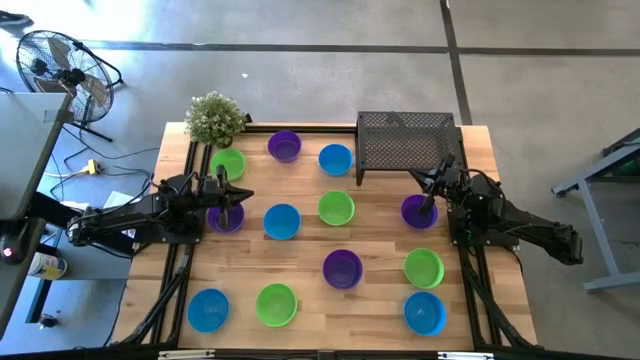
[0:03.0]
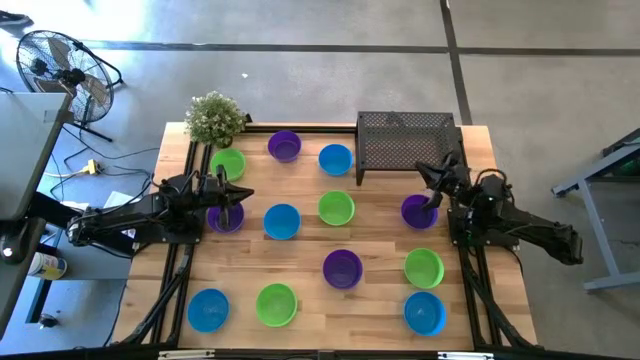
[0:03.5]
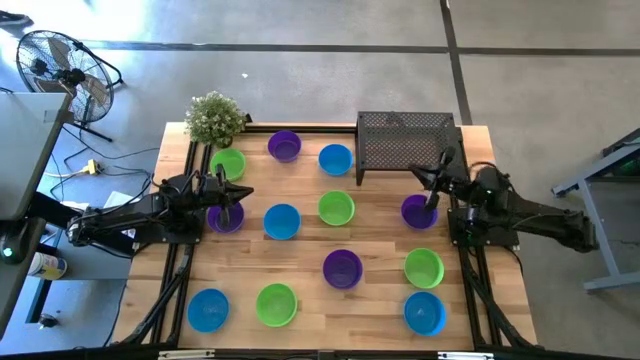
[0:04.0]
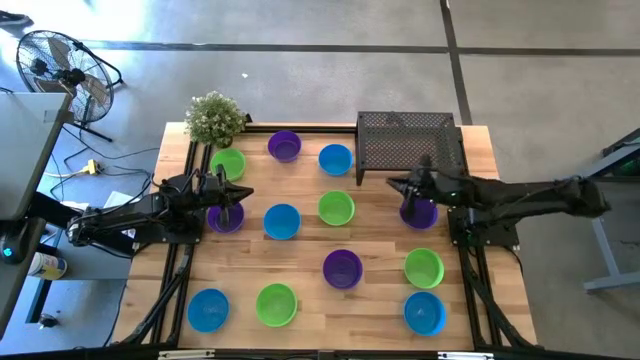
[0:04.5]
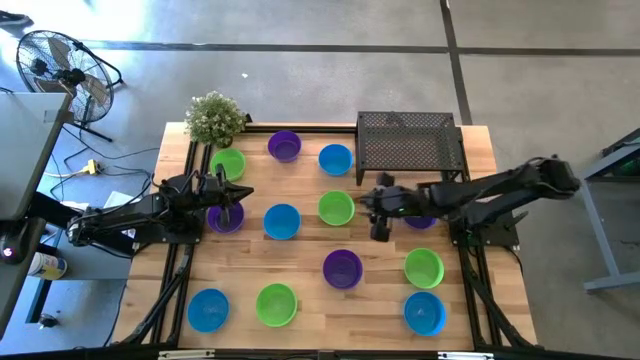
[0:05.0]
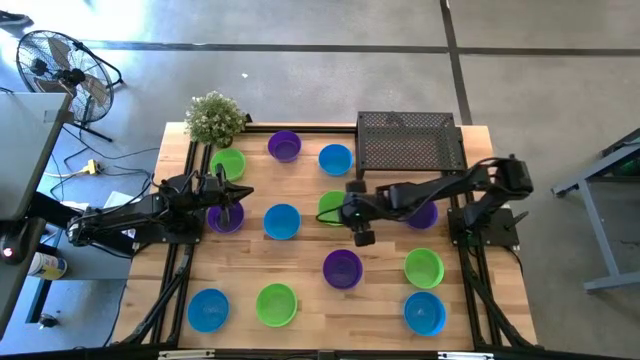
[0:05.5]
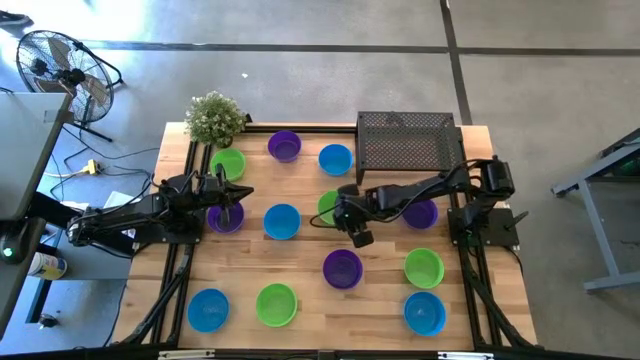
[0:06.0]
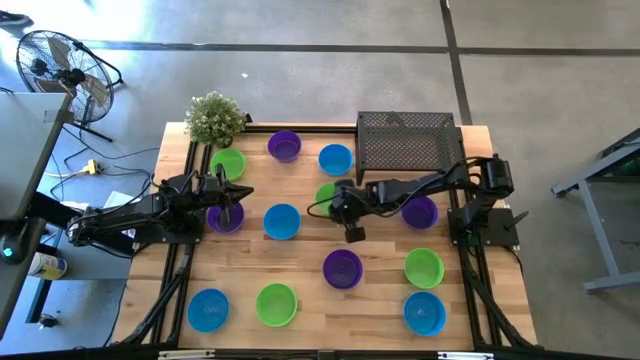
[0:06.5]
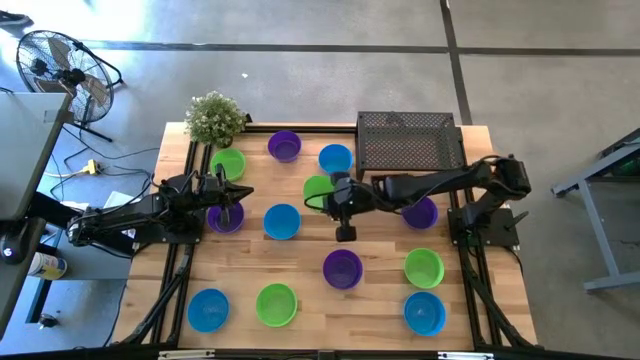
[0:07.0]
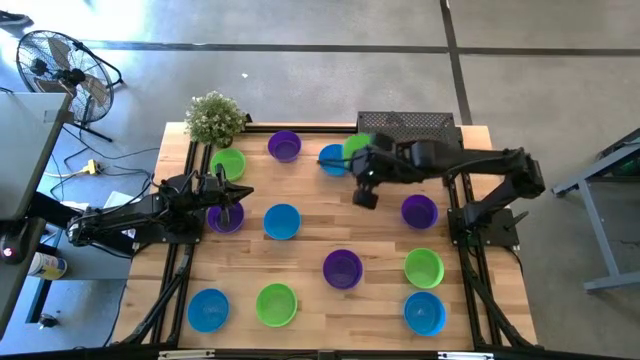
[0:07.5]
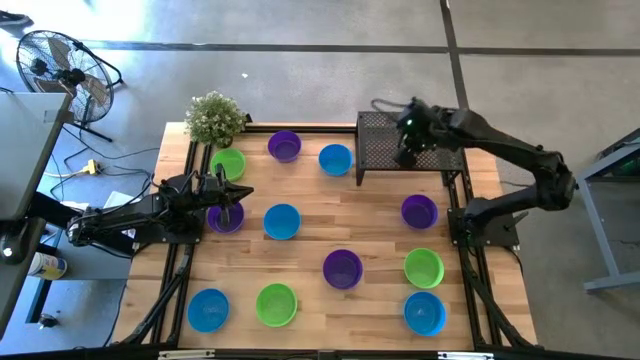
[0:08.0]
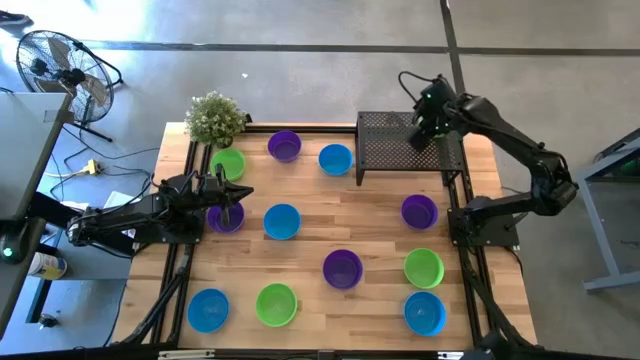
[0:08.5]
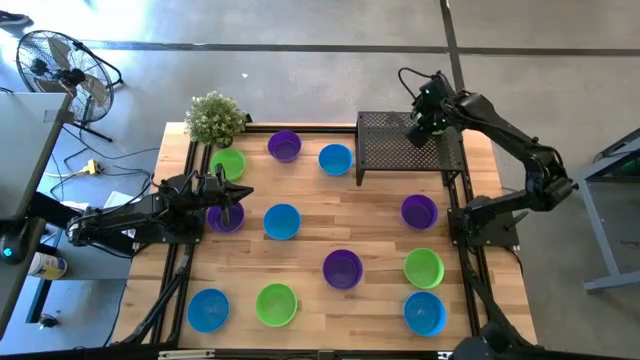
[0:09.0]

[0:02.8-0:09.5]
Task: Pick & Place Mini bowls
Put the green bowl on the shelf

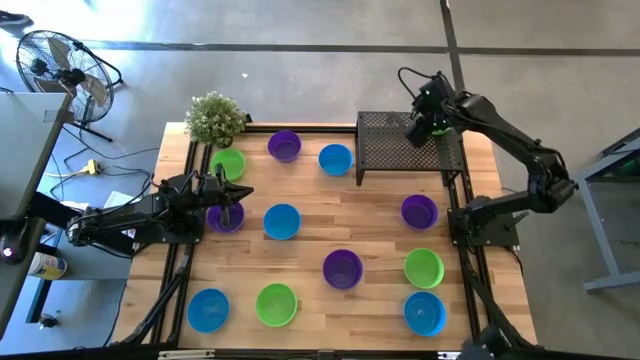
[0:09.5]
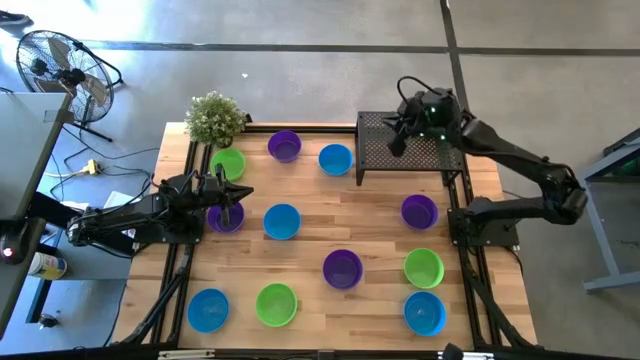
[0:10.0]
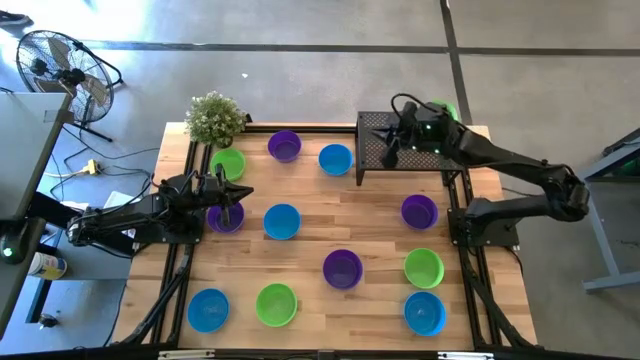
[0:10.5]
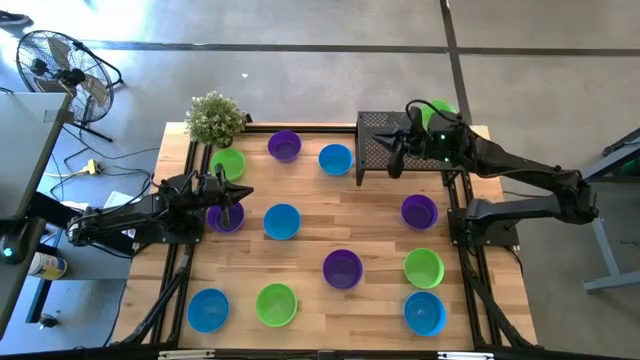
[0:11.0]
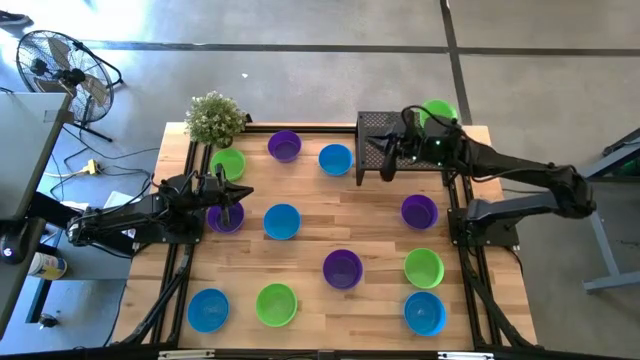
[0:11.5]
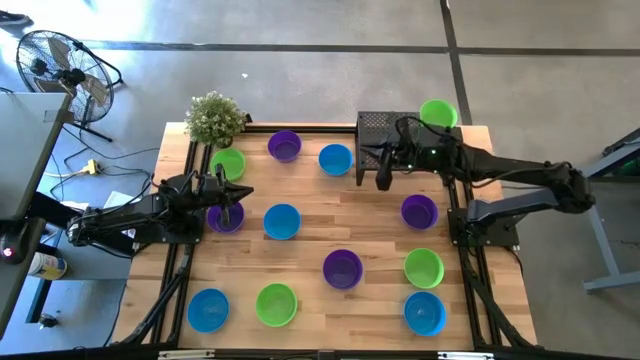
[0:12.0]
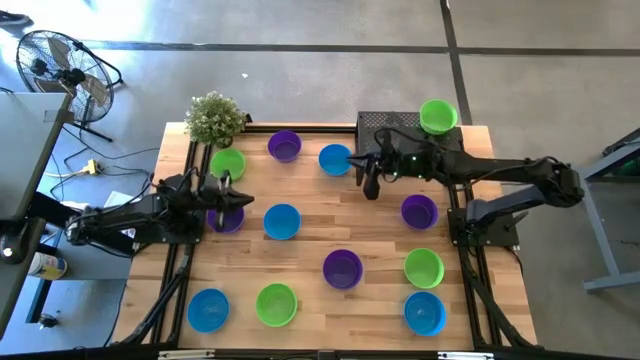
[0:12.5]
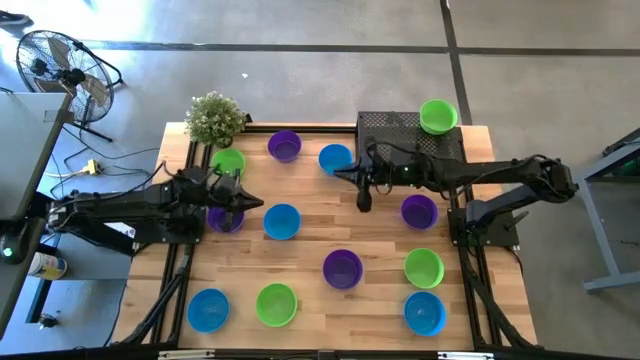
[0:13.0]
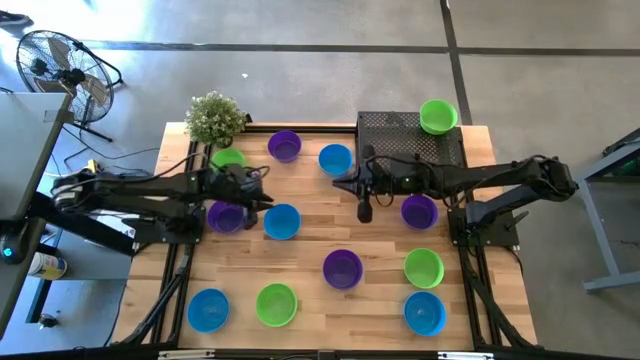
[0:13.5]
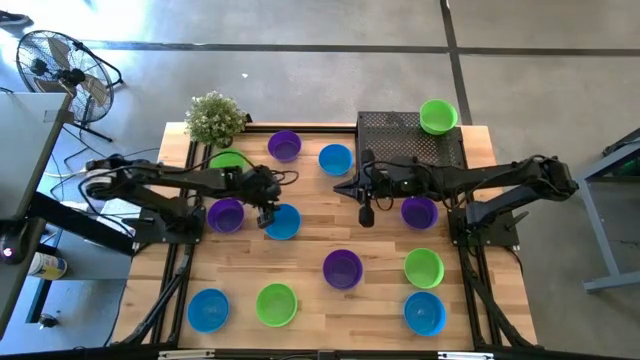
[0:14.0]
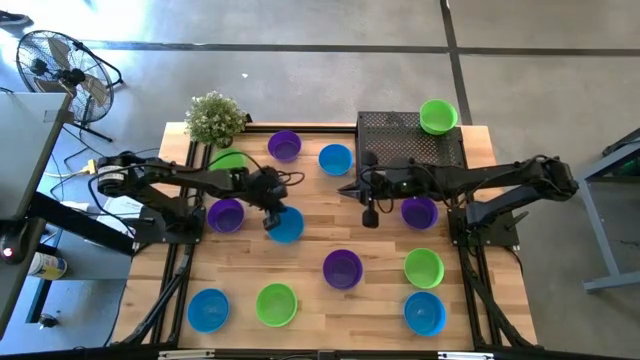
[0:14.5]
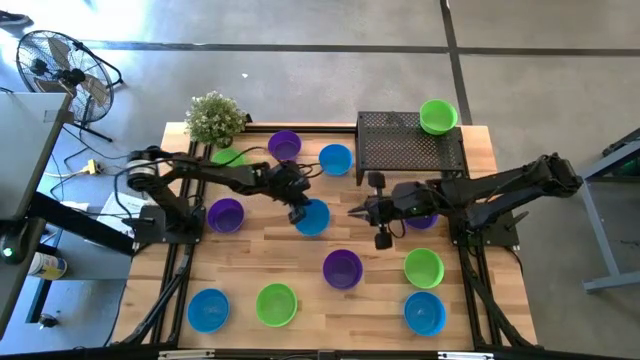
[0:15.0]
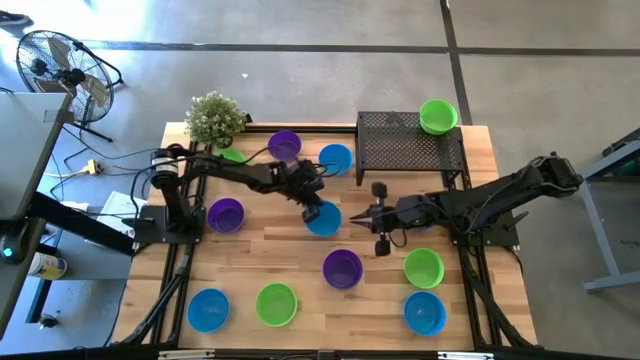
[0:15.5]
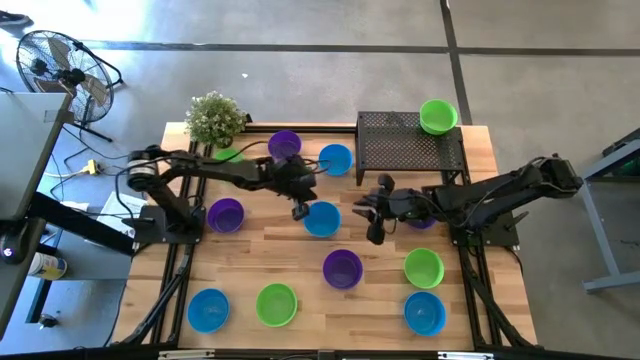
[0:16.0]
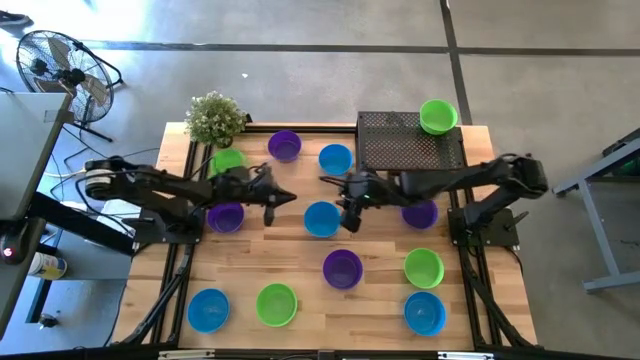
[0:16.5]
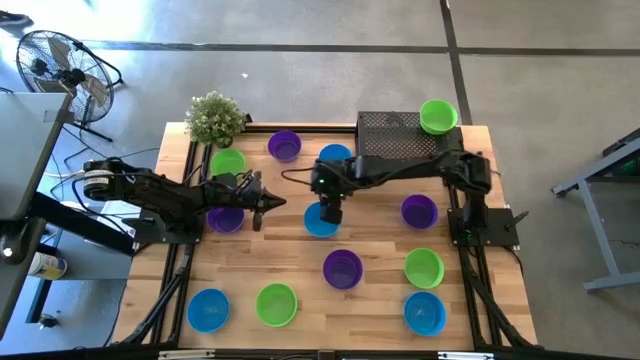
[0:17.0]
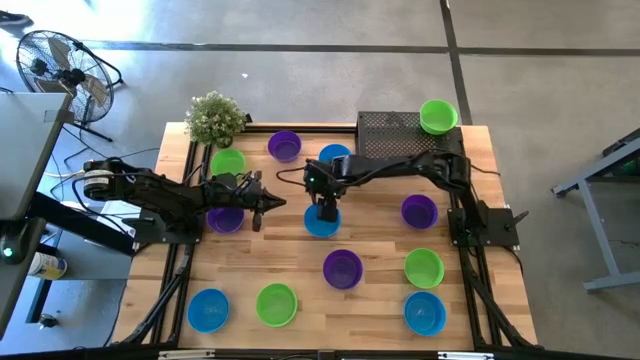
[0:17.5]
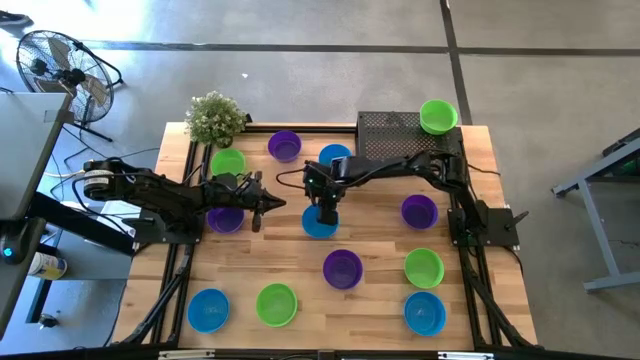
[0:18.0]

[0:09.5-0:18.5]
Put the blue bowl on the shelf

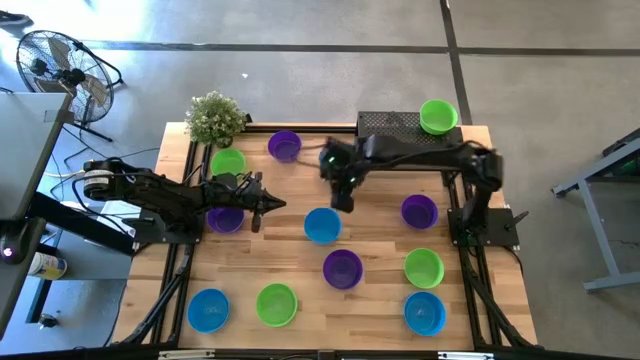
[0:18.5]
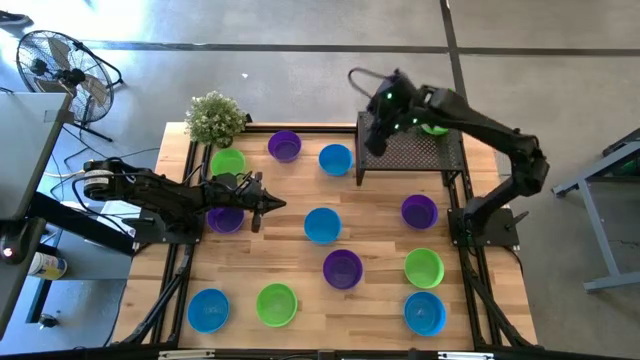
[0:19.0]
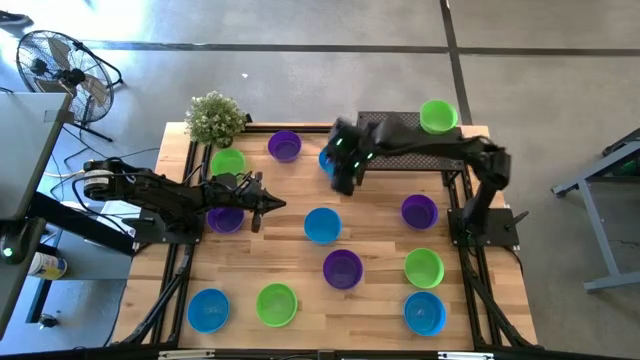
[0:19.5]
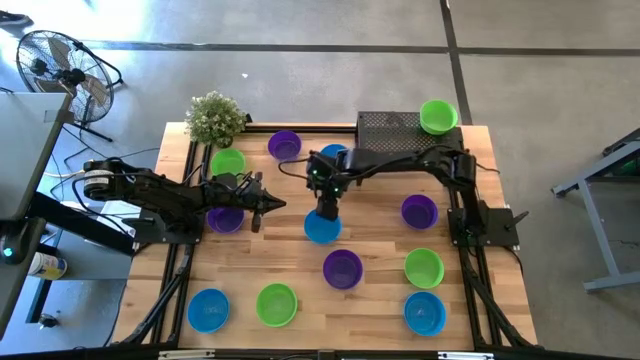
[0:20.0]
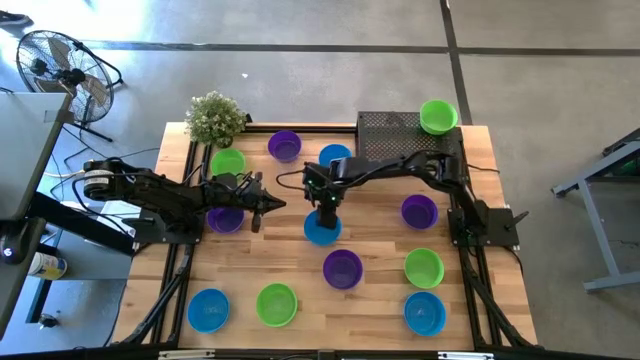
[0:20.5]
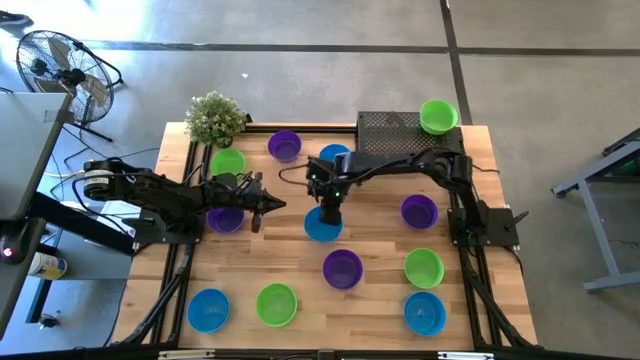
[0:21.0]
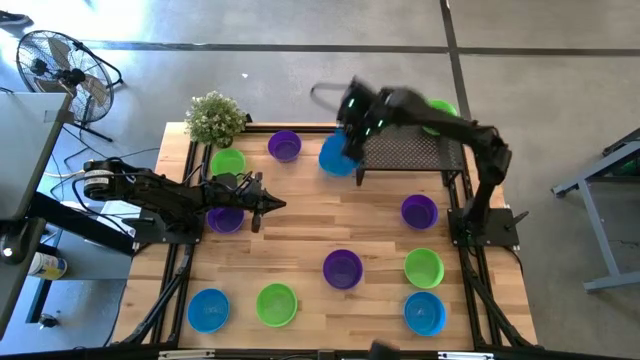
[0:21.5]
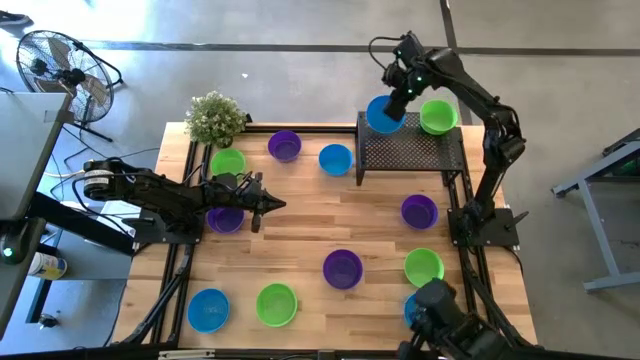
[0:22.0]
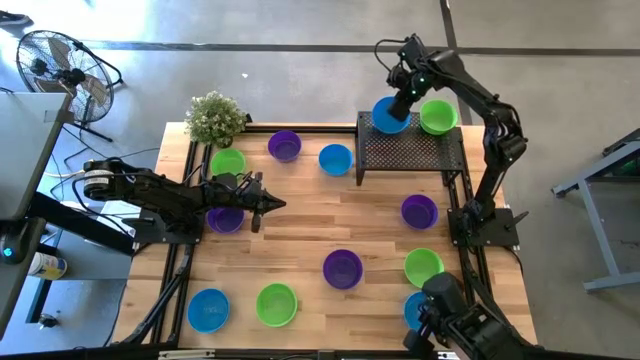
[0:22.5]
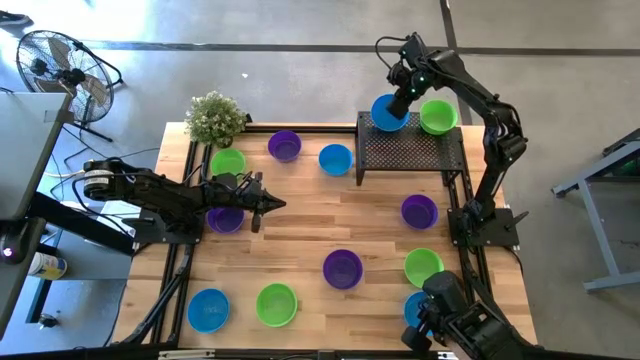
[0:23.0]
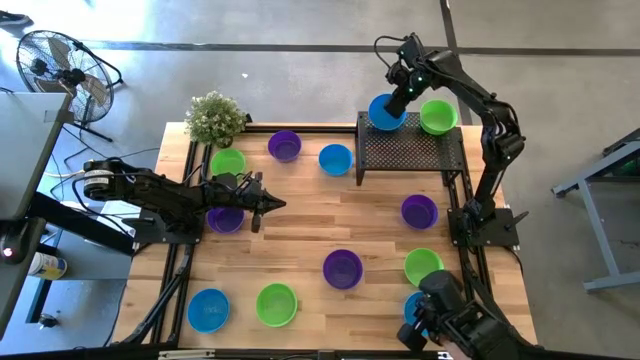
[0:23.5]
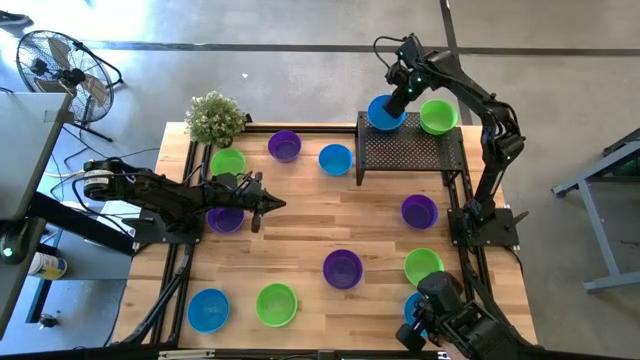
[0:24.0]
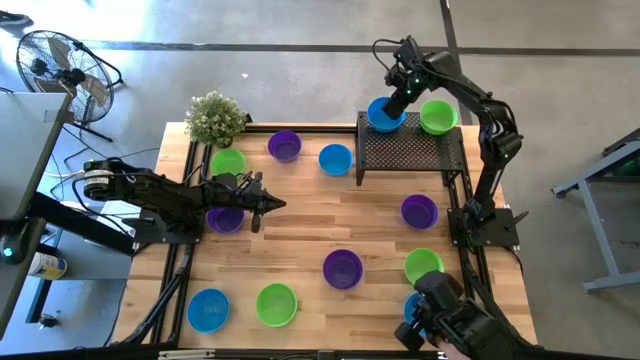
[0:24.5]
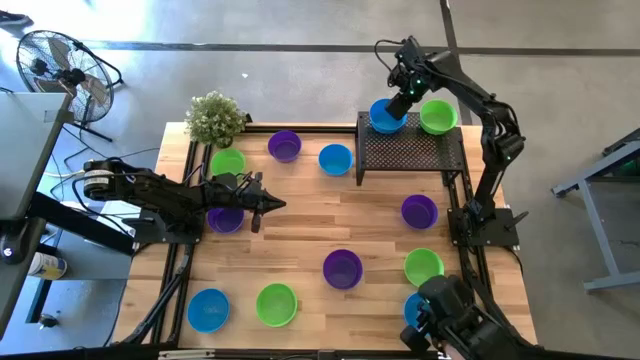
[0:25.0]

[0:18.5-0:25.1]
Put the blue bowl on the shelf
